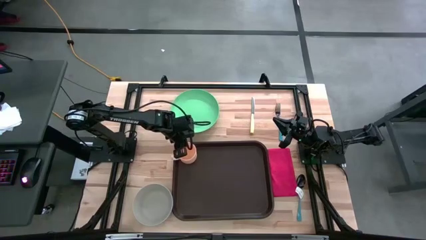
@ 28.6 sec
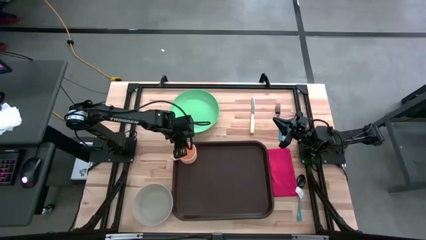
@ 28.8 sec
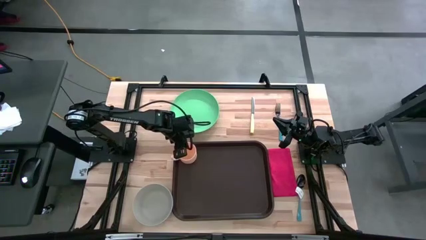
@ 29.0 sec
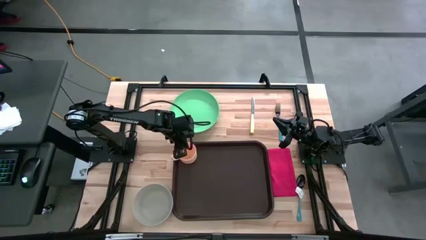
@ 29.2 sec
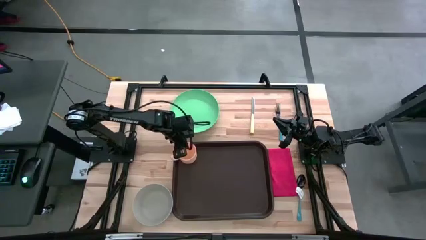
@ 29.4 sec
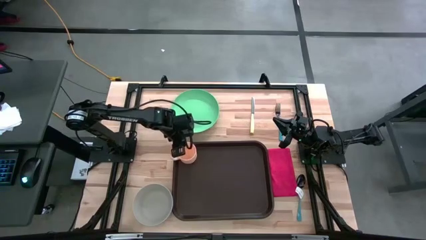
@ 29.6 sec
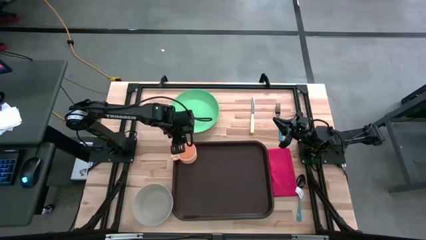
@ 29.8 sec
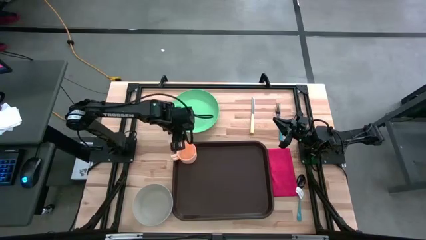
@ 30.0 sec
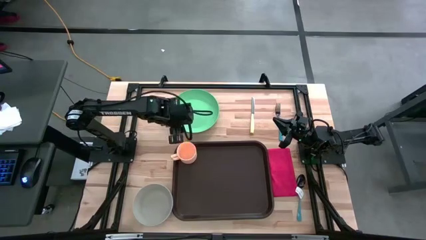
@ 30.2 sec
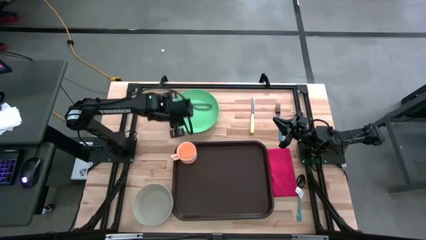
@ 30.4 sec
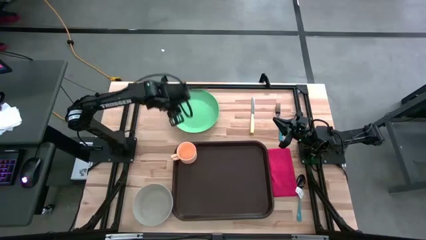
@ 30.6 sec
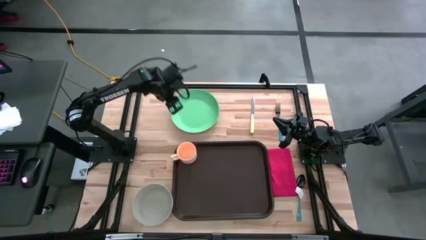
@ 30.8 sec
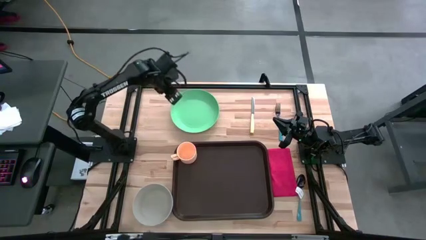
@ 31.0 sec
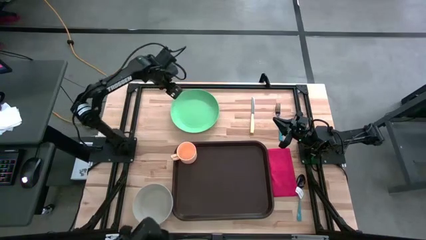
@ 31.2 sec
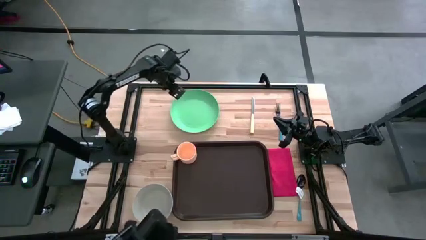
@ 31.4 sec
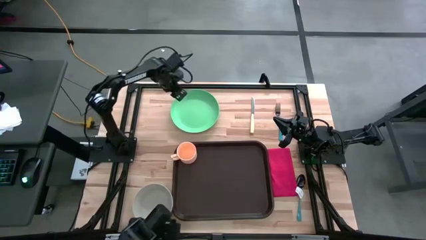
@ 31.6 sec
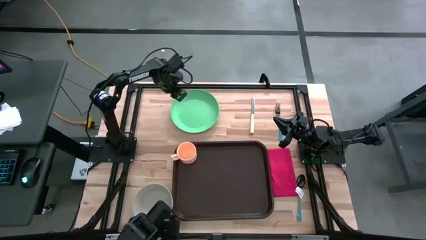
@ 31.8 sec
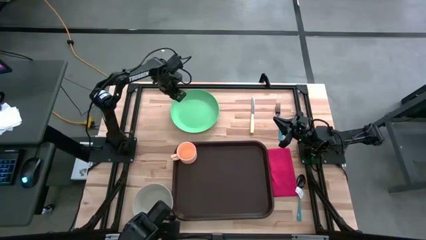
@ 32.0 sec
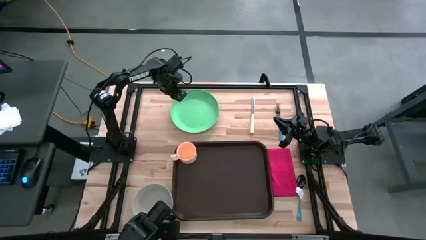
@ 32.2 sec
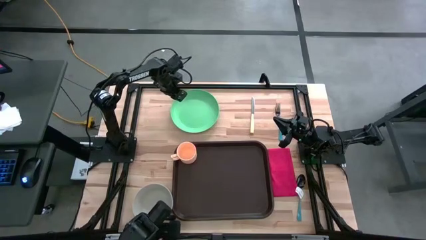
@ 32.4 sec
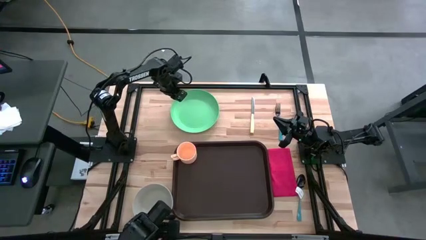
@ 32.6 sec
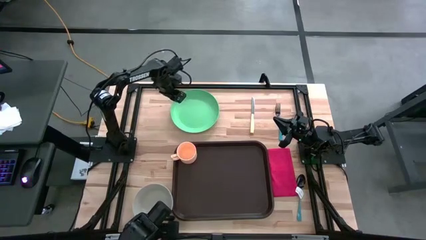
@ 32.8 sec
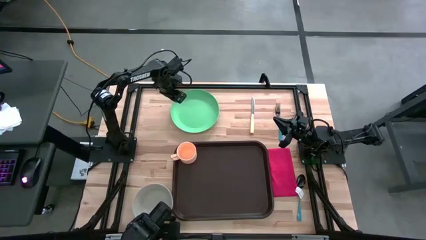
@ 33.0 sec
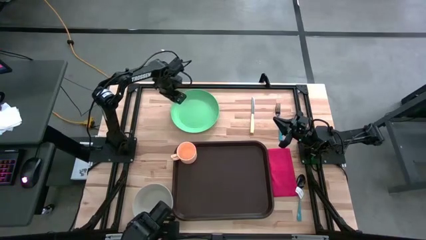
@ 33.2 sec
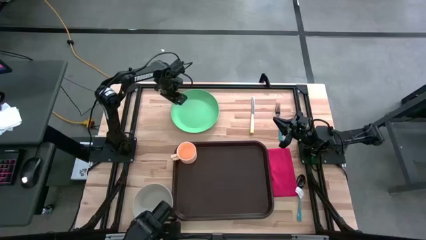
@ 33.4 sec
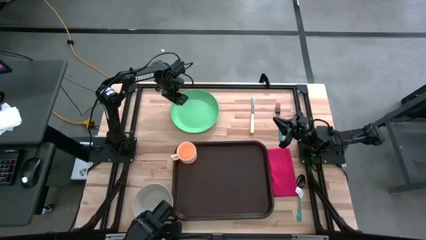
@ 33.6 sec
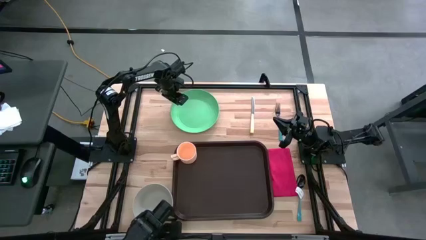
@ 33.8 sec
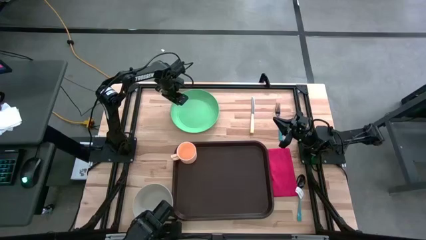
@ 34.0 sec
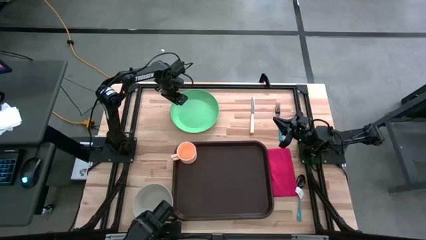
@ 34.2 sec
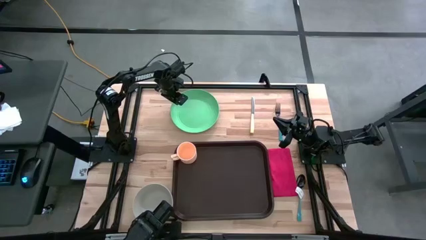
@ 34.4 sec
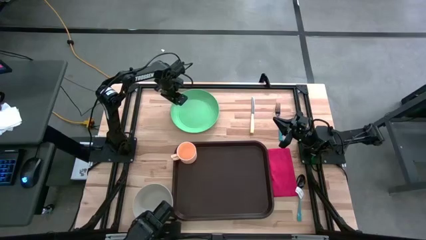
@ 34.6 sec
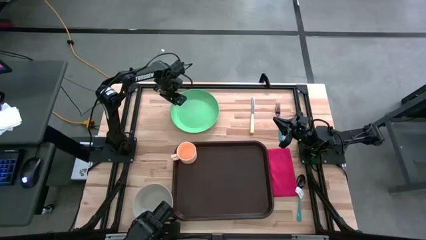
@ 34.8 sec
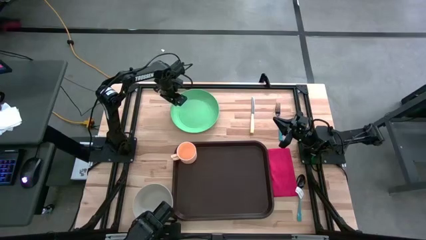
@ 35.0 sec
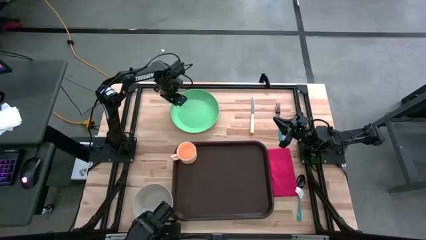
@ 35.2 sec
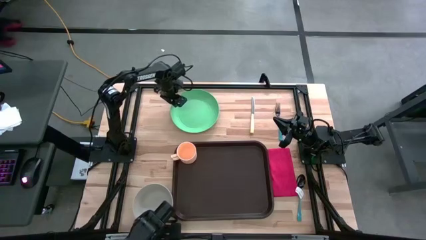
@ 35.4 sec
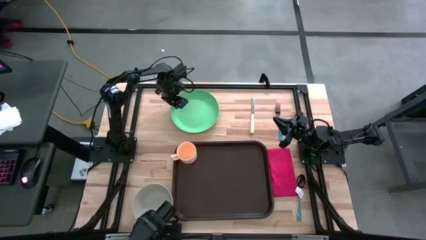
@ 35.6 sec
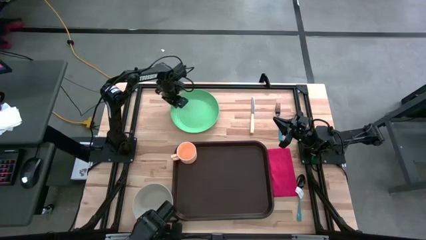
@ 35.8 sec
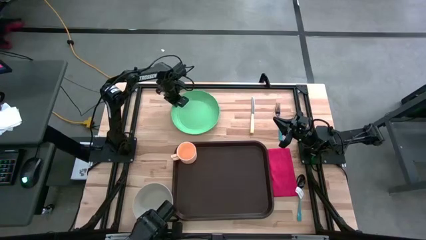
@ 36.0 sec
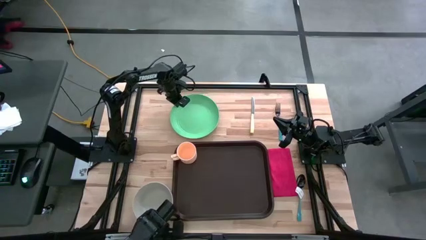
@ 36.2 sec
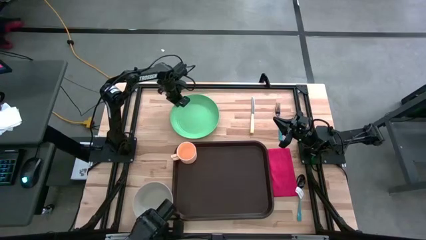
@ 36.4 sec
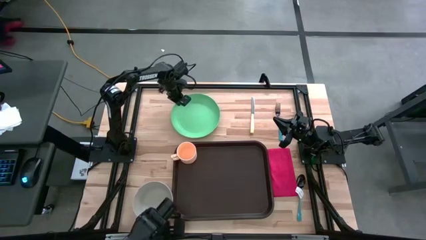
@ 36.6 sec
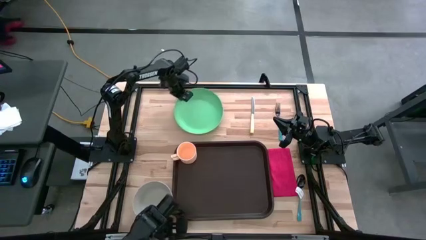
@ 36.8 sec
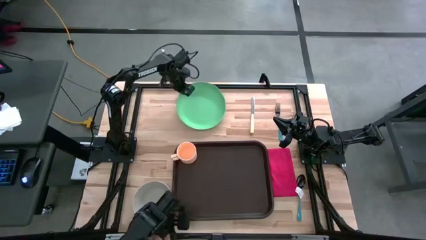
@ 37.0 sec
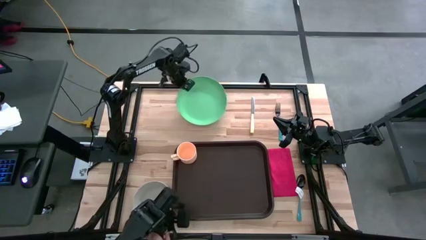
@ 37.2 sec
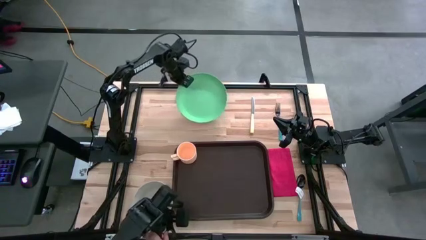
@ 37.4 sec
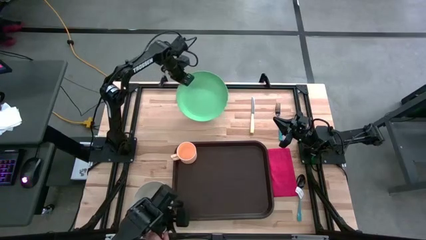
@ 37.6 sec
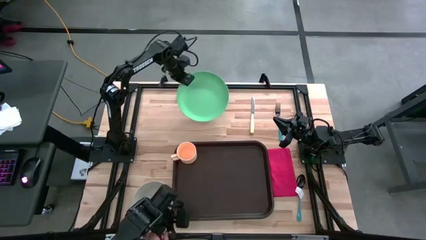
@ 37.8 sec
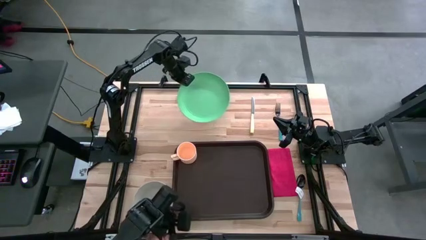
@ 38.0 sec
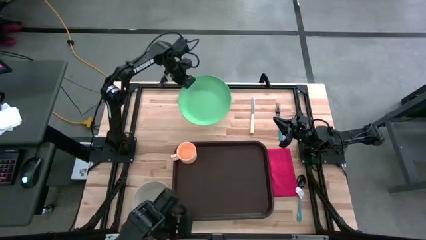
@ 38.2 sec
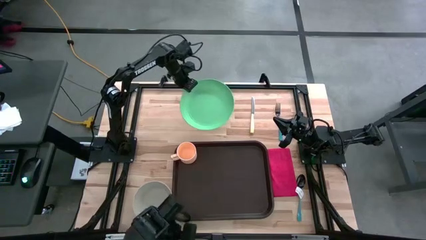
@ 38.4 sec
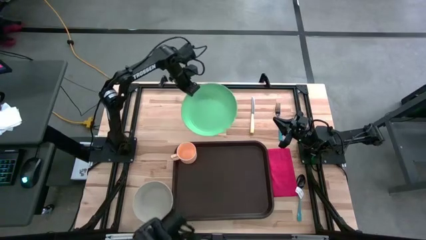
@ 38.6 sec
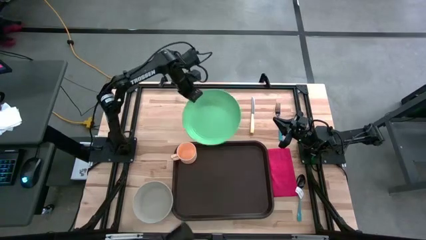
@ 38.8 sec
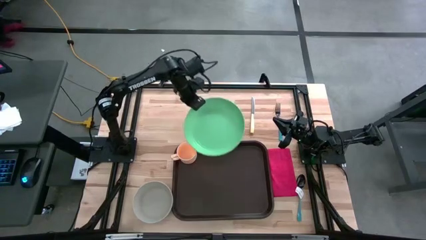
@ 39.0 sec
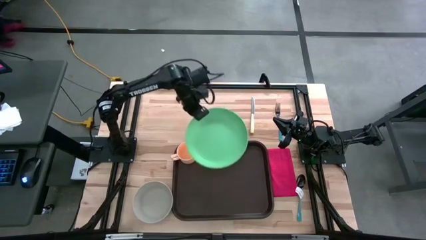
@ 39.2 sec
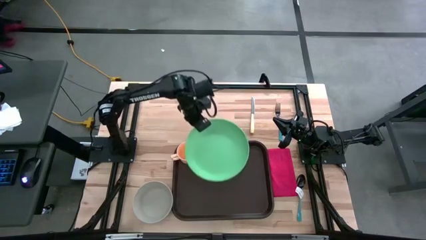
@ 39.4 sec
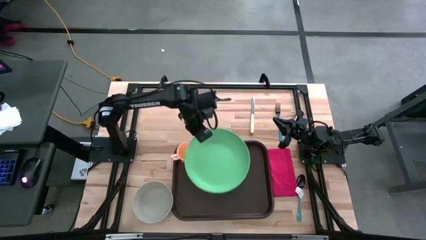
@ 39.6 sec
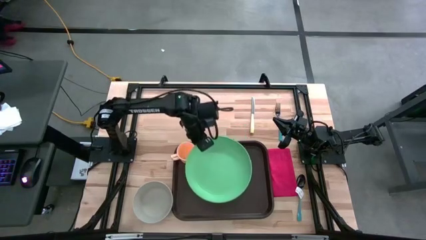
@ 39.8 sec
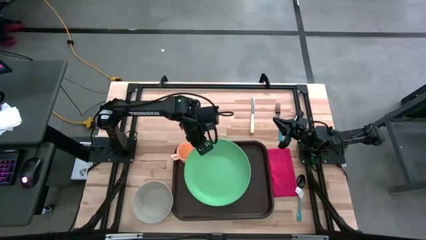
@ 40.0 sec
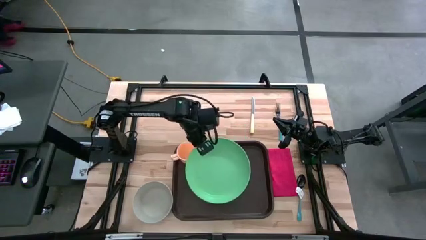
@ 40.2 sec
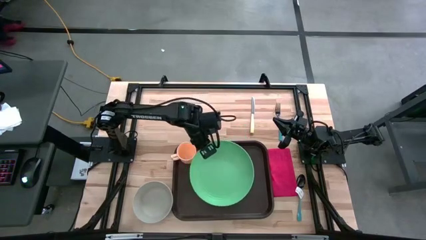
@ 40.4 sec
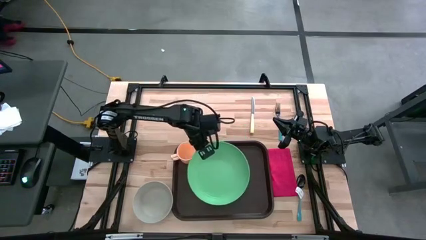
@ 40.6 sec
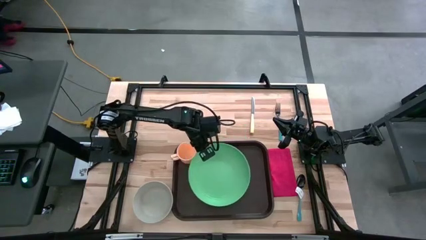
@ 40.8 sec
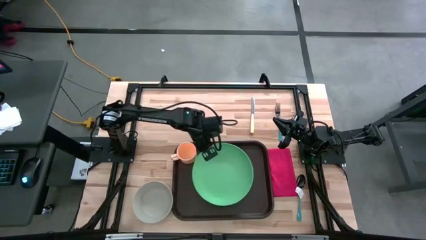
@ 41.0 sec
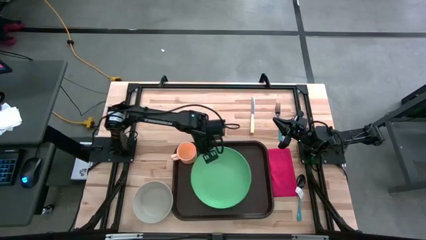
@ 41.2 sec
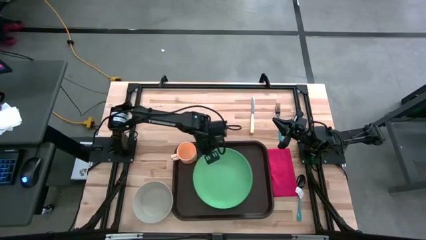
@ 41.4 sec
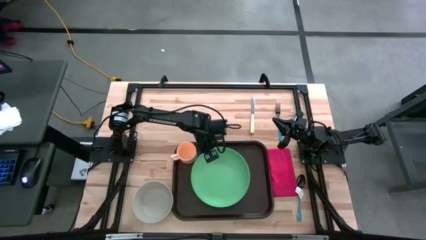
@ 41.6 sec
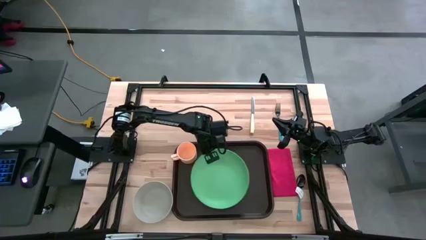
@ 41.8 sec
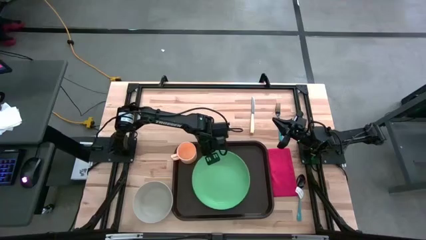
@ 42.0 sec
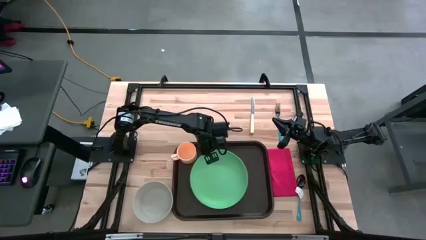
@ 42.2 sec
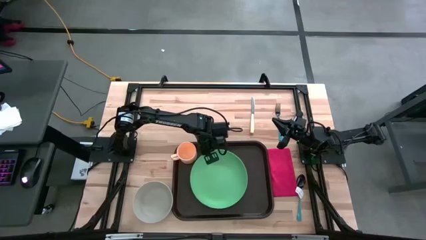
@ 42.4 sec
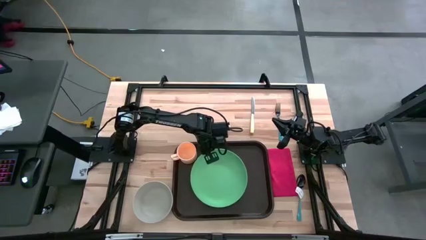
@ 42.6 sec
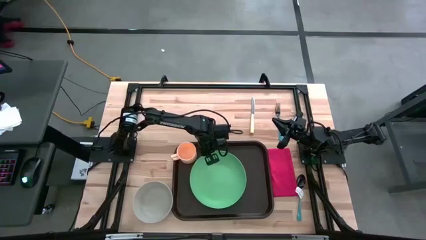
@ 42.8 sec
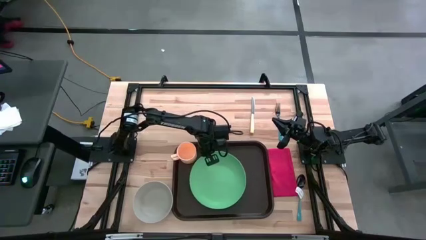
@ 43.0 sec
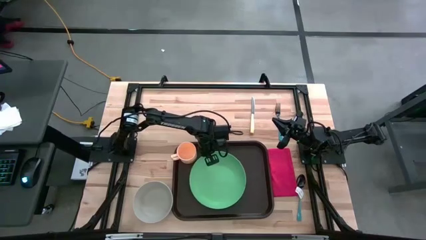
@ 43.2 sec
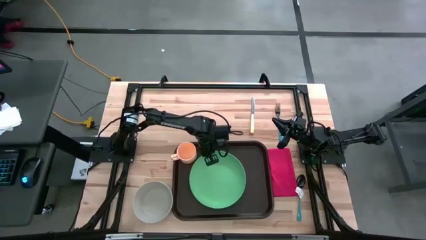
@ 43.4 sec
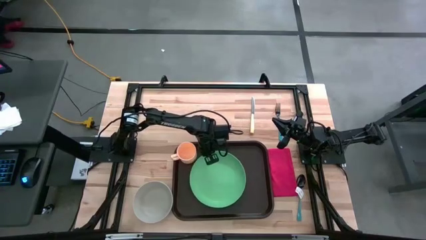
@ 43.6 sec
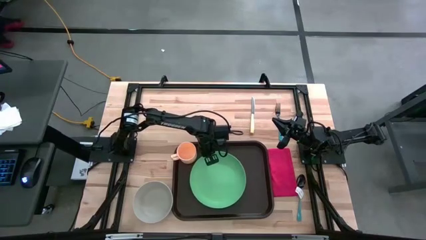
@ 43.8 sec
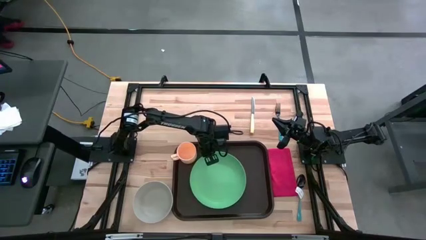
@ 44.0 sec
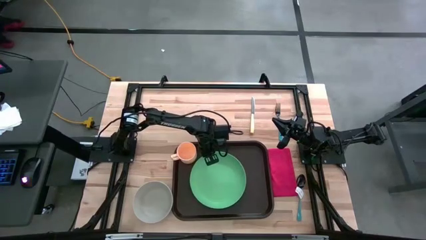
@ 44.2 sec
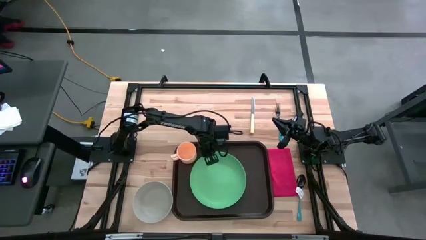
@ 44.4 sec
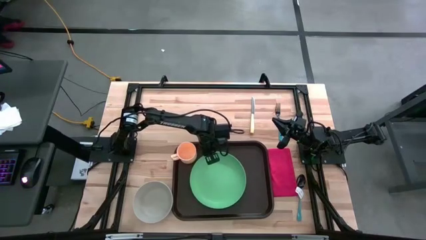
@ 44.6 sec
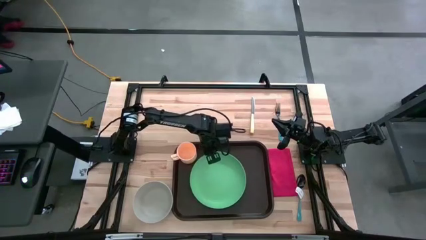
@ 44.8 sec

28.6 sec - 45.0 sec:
Task: Set up tray
Put the green plate under the orange mug on the brown serving tray
